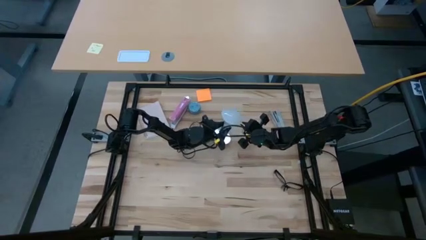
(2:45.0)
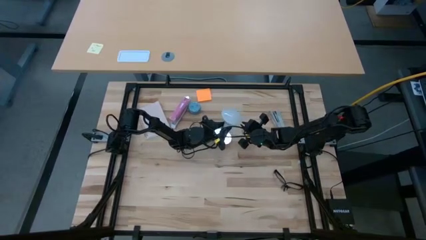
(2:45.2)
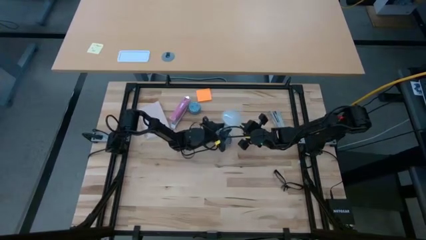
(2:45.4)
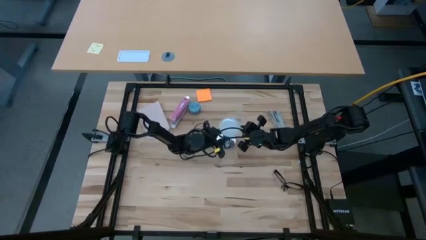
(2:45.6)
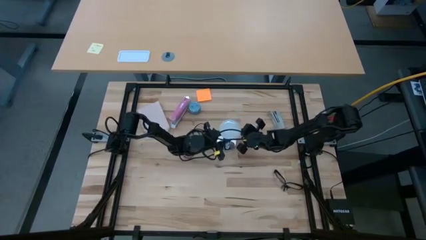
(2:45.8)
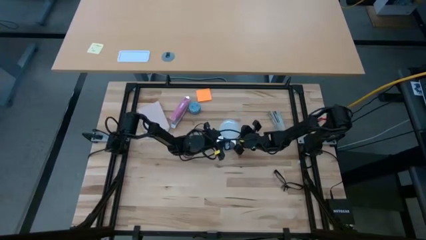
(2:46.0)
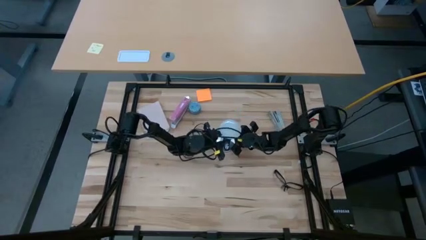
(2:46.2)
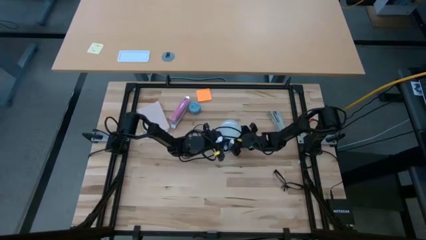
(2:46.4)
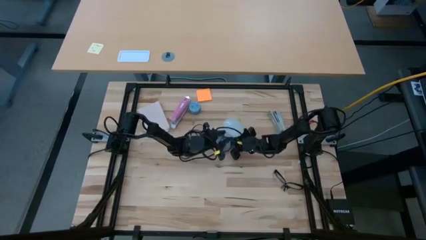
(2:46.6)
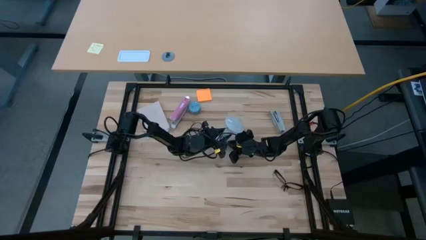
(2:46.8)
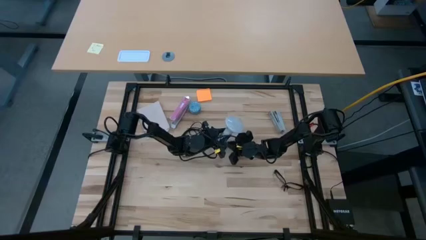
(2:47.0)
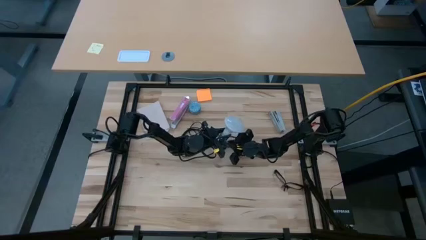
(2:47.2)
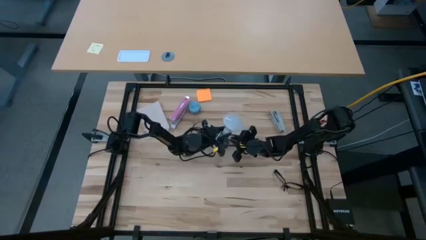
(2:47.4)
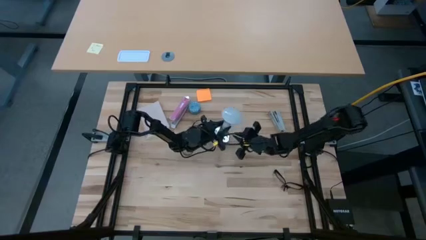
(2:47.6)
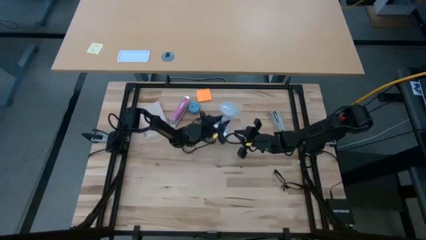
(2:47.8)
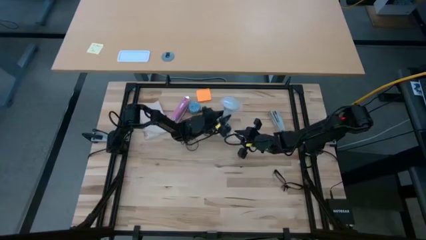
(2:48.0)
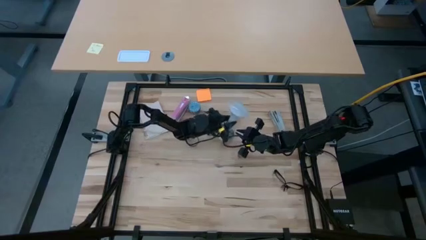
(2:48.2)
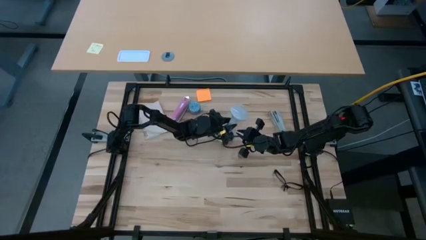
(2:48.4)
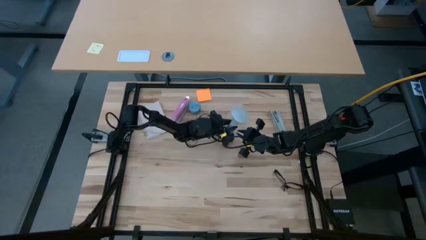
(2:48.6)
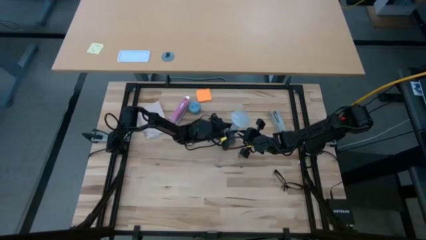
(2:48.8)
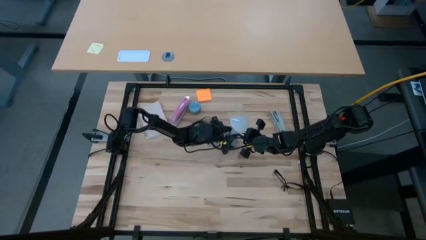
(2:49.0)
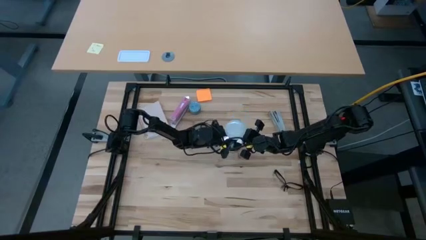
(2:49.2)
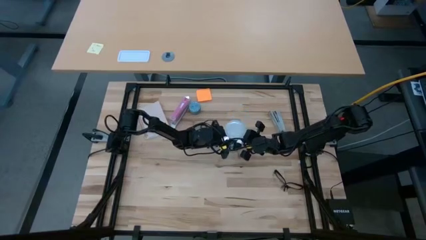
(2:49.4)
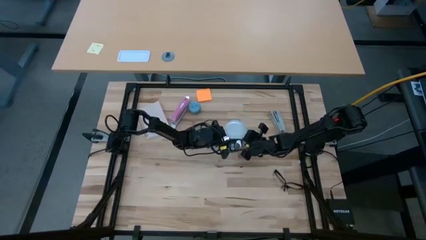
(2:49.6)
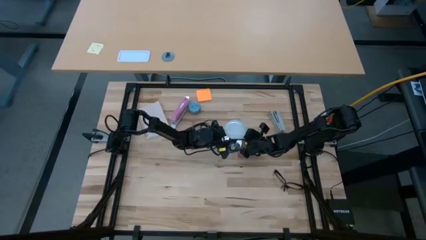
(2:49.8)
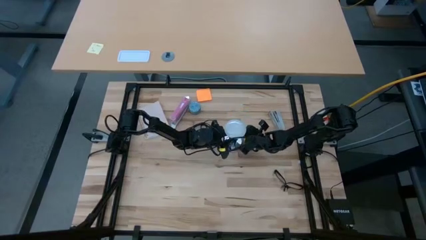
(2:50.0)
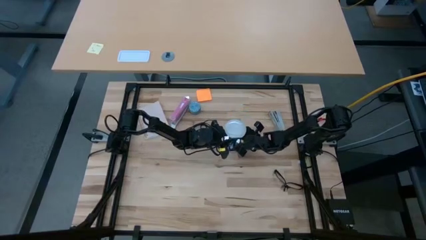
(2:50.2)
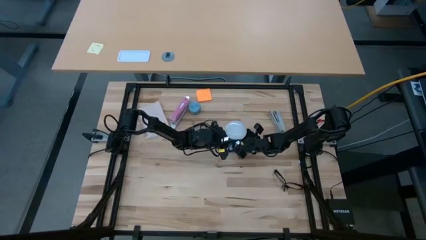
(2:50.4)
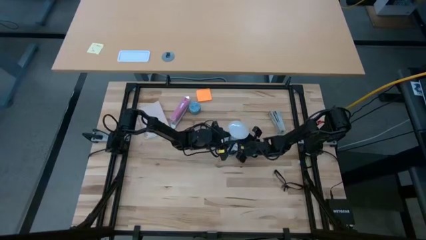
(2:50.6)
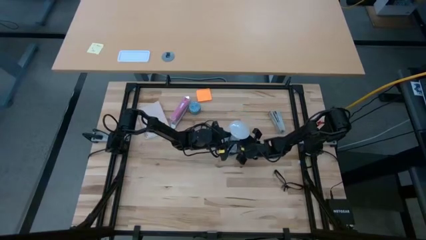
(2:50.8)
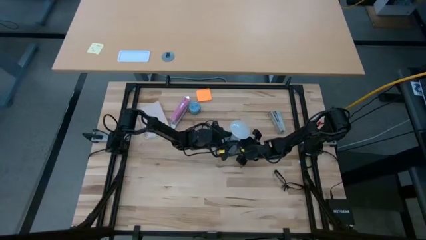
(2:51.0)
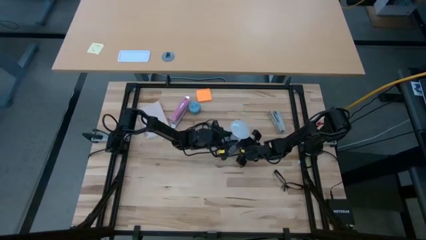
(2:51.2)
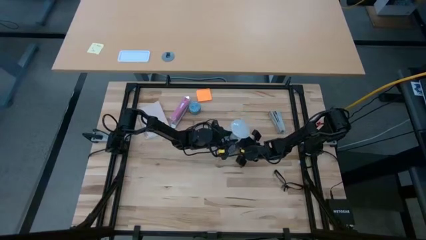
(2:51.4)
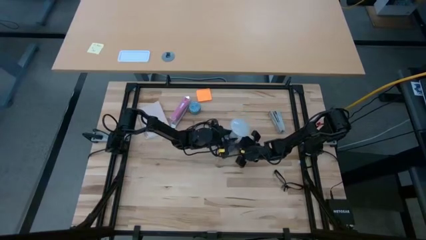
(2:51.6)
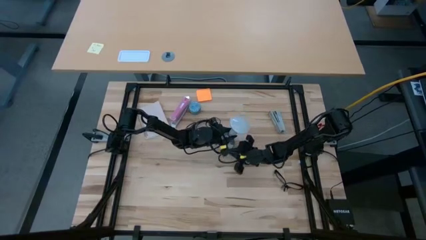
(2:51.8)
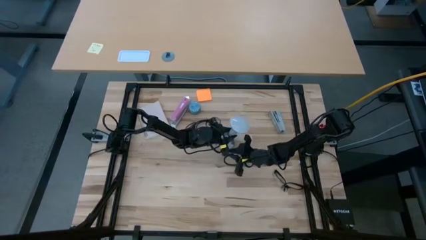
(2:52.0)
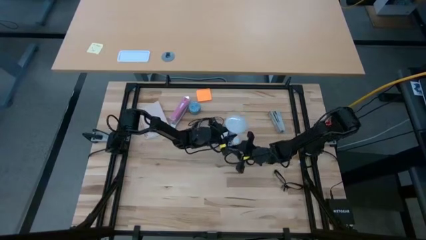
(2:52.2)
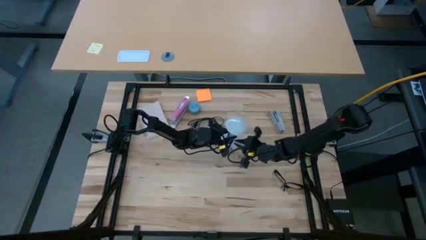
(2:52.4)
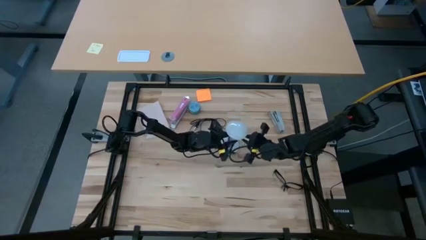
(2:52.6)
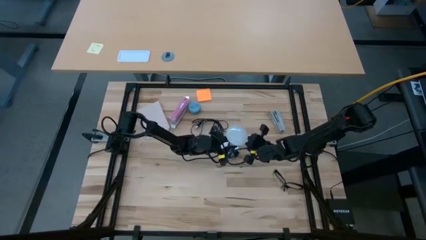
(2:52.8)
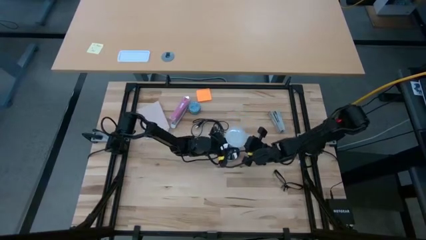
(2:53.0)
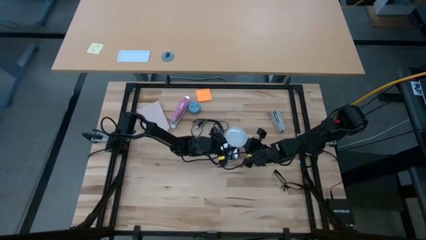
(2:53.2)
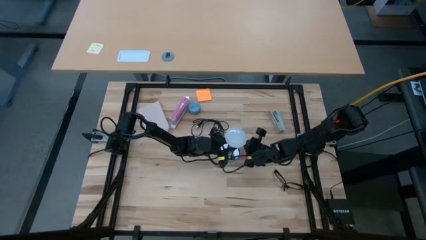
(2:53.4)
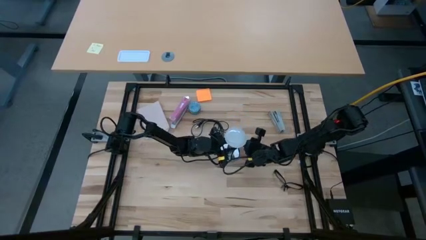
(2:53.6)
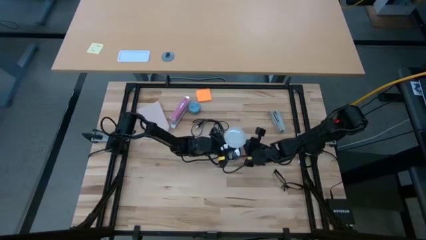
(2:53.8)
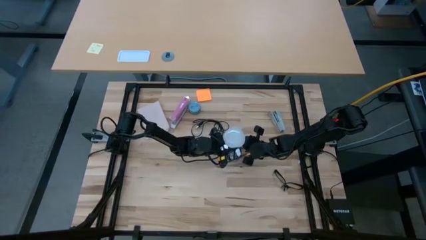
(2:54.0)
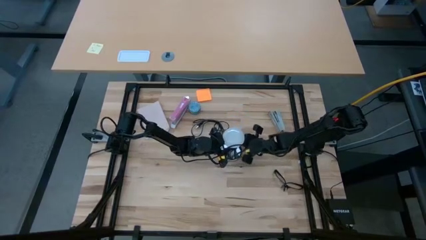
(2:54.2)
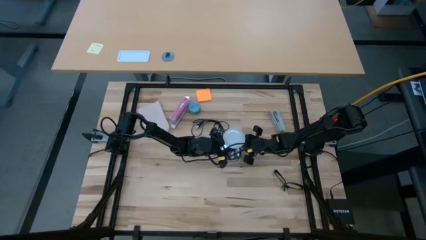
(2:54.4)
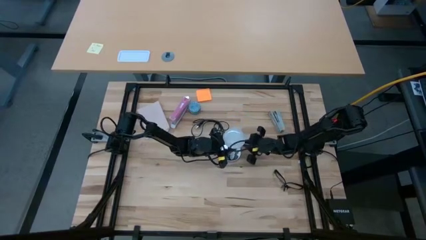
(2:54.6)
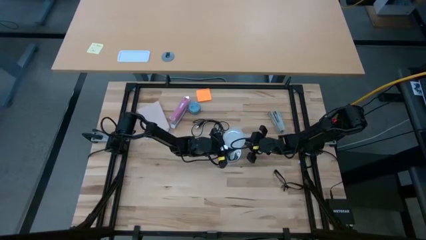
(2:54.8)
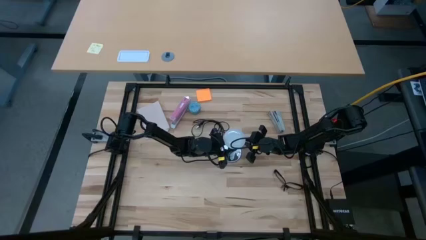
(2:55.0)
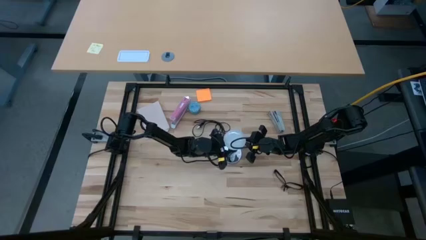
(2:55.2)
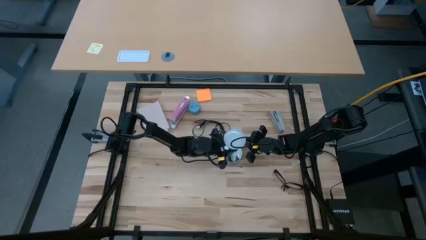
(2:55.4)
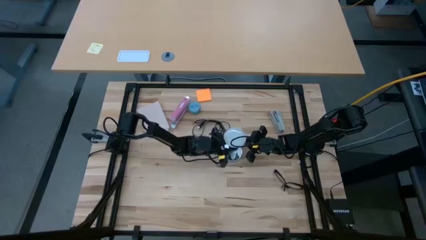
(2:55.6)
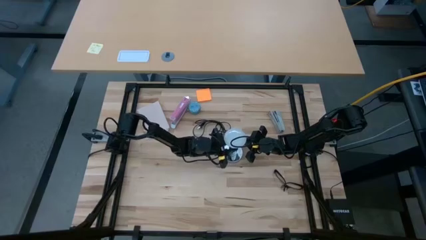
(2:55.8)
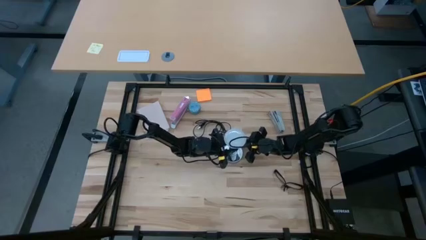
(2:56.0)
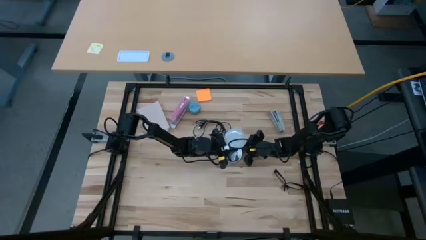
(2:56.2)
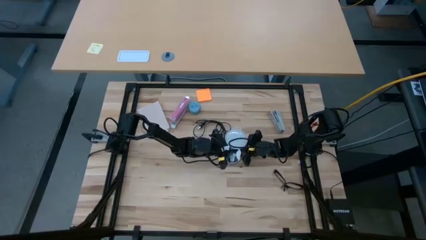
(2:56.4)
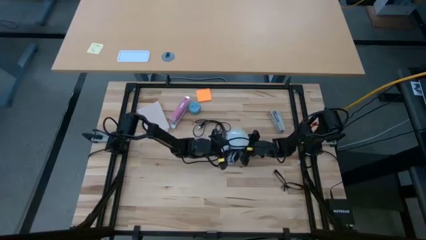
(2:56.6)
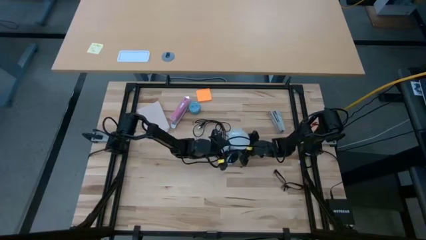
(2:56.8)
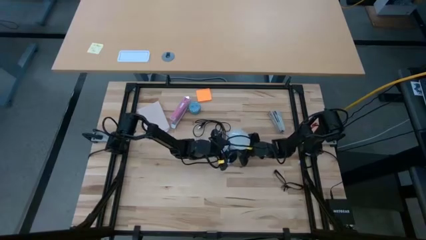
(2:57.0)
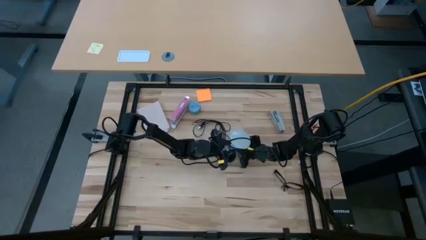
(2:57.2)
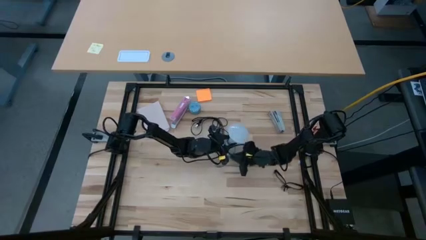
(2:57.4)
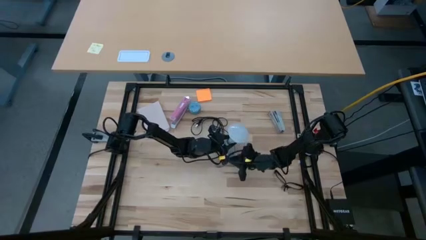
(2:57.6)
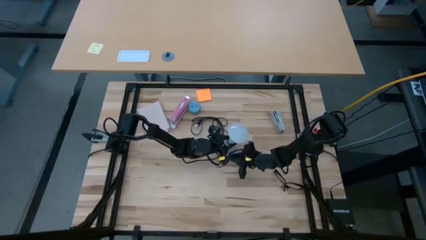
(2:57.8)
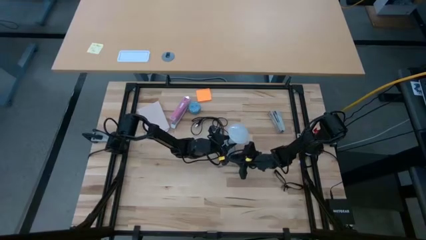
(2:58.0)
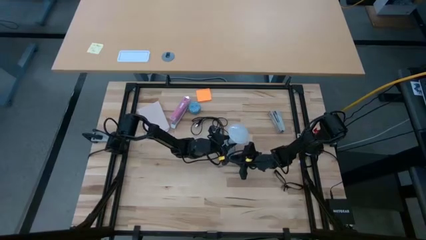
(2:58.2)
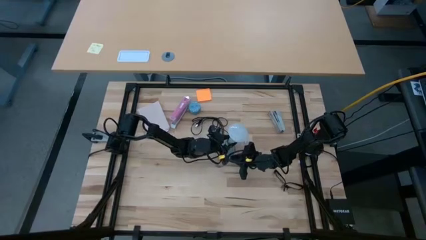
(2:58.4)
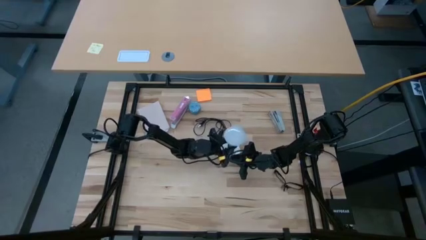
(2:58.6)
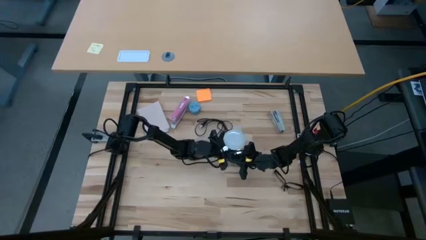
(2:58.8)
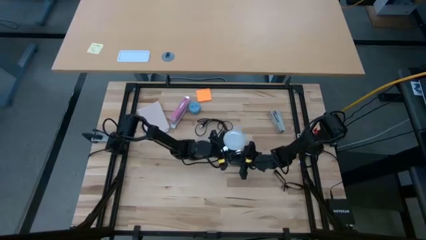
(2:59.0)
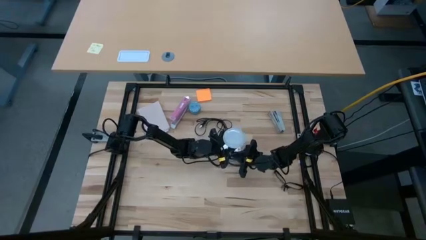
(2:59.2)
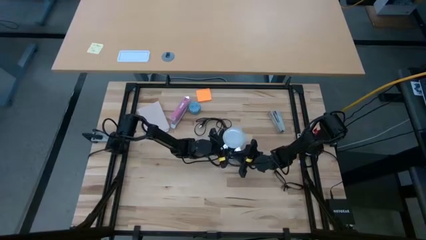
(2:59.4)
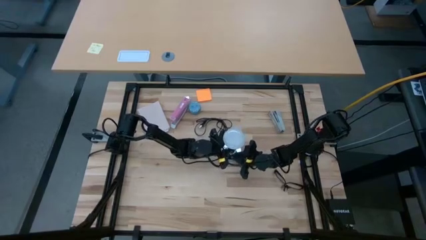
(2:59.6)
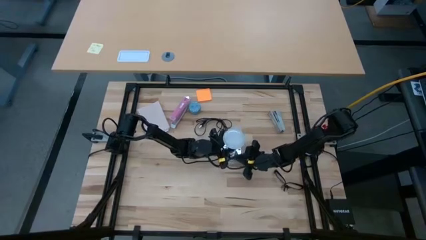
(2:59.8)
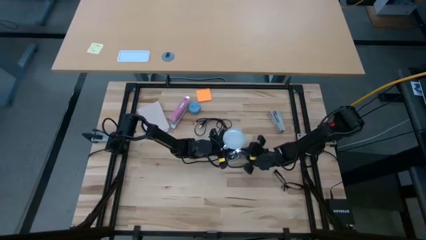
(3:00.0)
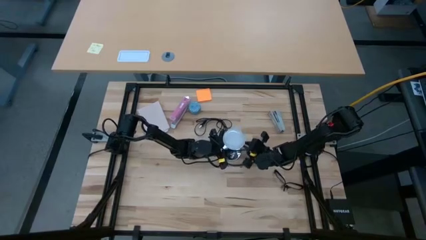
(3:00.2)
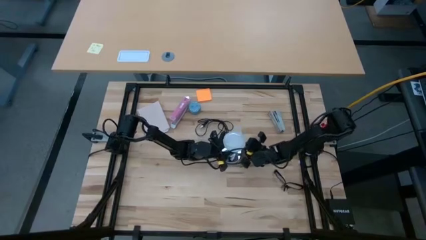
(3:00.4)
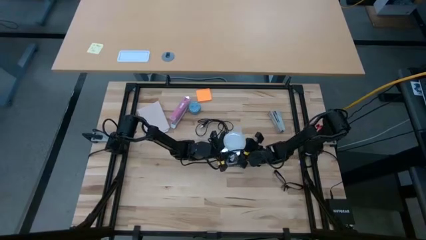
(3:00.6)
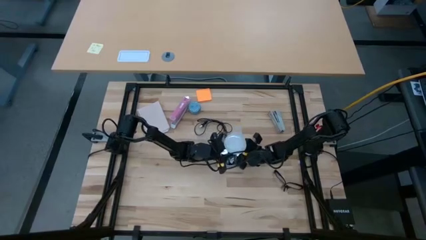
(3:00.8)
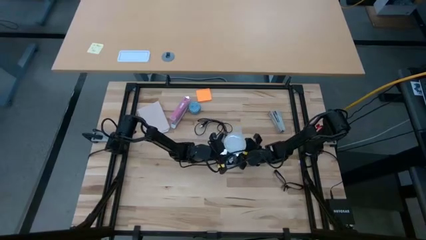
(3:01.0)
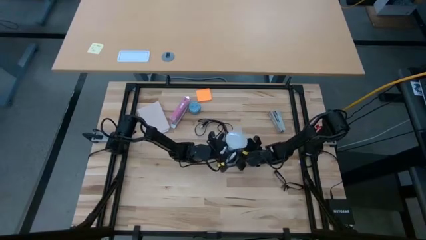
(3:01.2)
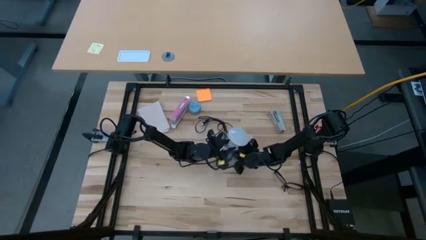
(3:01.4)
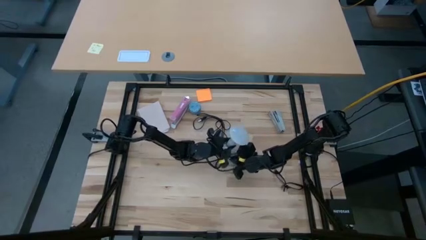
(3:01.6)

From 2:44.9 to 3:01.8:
Task: Screw lightbulb
Remove the lightbulb from the lamp
